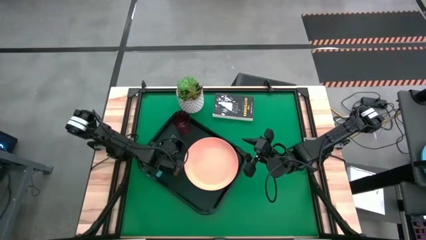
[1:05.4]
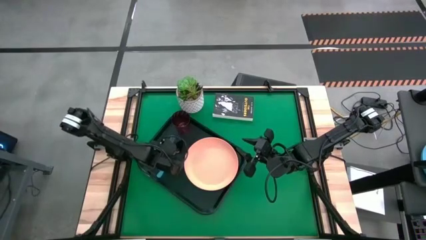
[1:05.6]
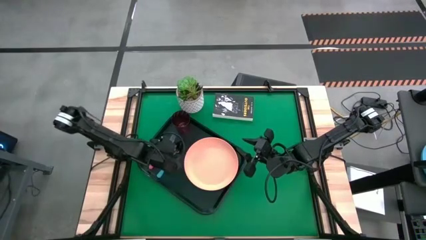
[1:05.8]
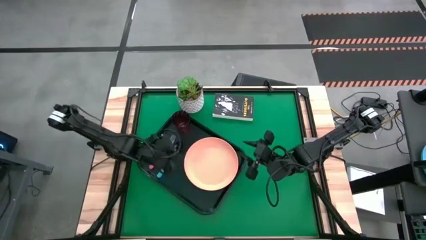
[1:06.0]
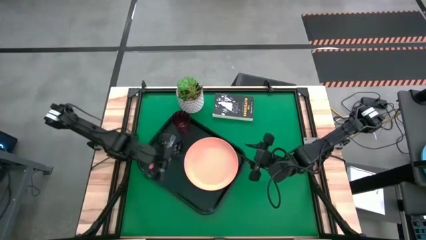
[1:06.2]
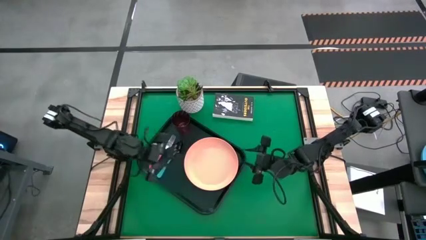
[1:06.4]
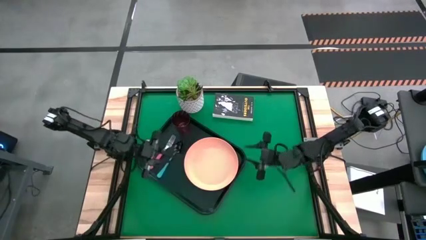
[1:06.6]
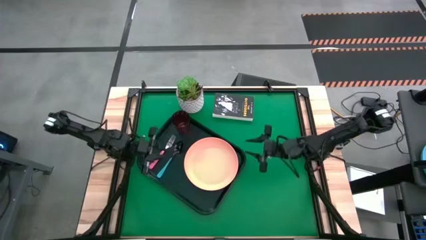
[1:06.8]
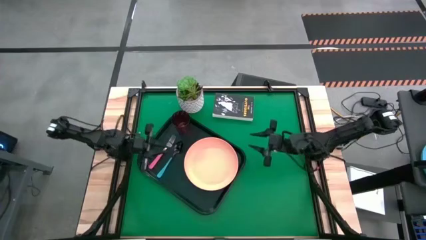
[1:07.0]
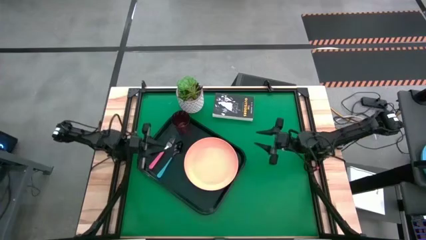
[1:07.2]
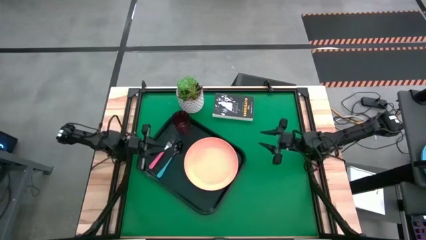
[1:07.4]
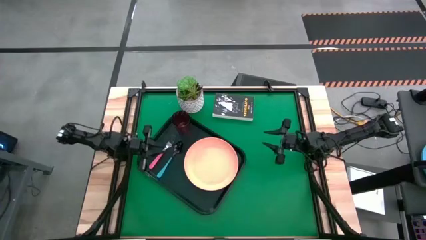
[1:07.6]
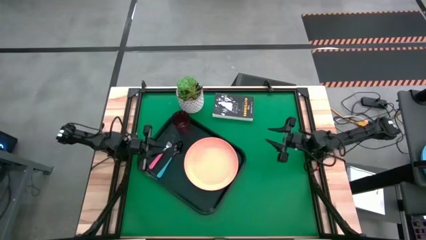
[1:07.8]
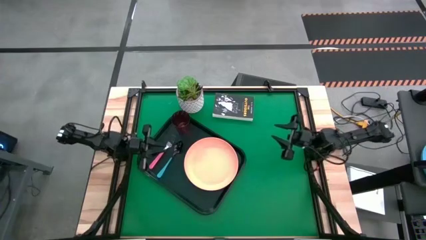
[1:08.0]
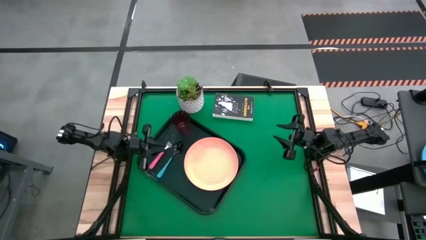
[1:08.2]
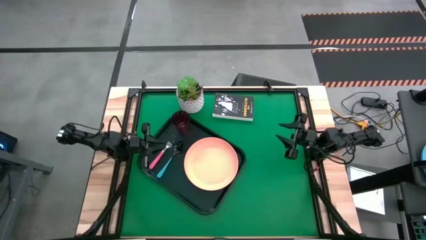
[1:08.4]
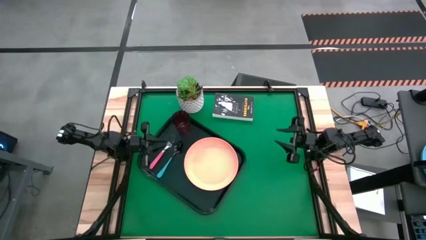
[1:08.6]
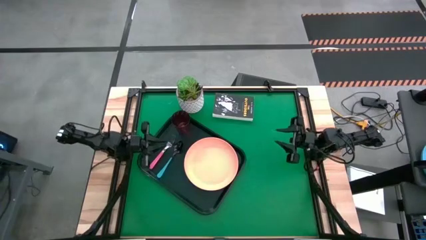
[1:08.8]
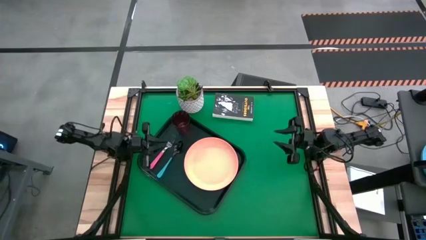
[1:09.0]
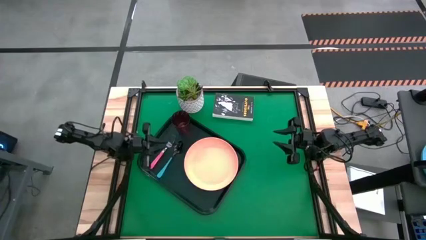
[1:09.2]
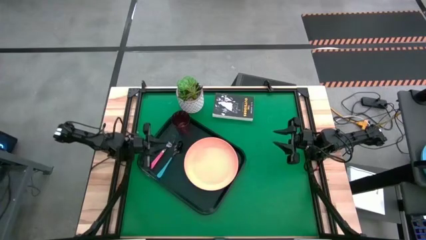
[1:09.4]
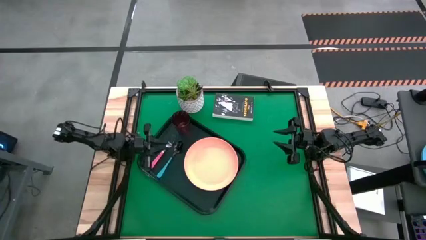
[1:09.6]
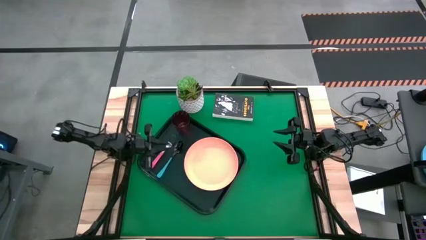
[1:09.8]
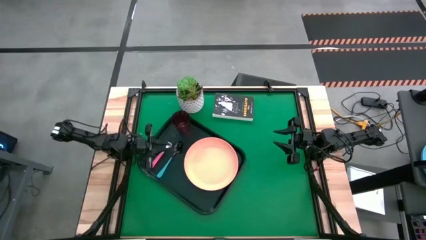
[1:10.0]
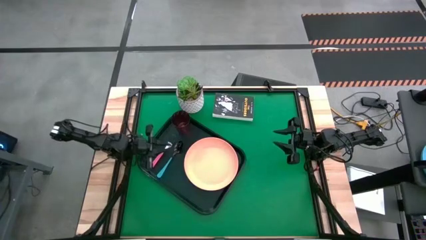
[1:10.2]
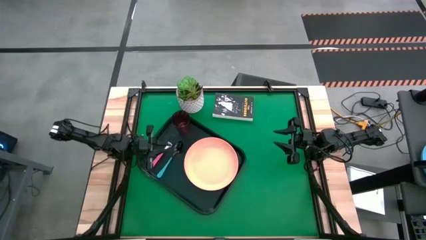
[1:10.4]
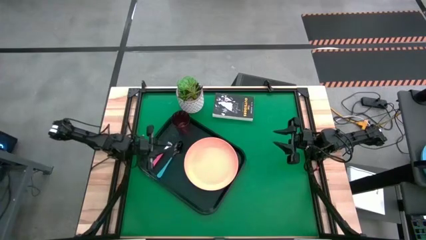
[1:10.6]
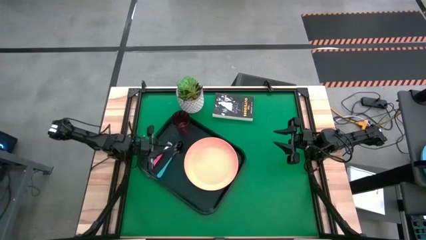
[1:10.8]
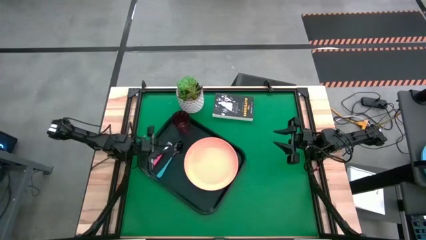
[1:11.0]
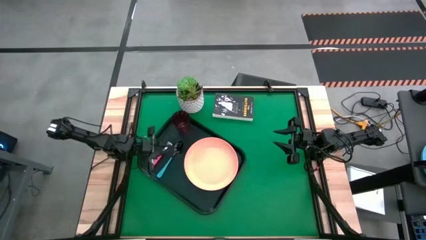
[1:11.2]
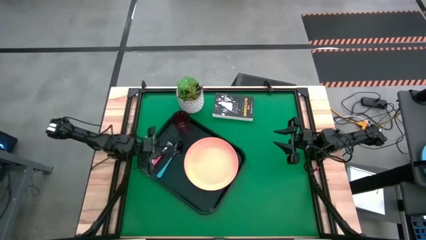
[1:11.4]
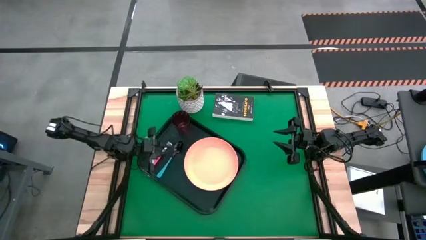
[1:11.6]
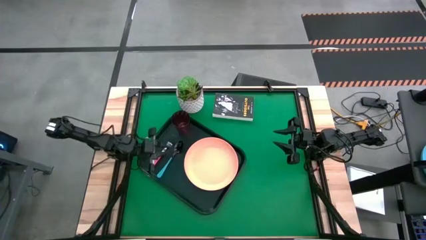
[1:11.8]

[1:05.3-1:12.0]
Task: Pick and place plate/cup/fork/spoon on tray
Return to Home Position

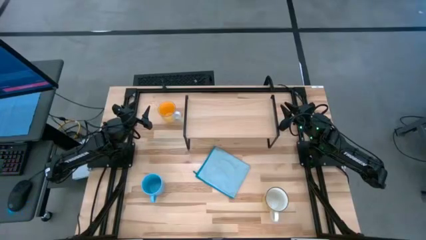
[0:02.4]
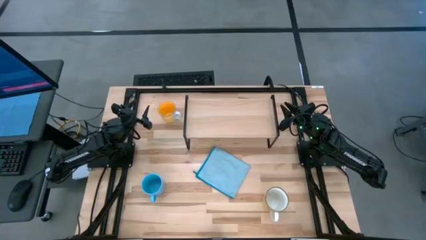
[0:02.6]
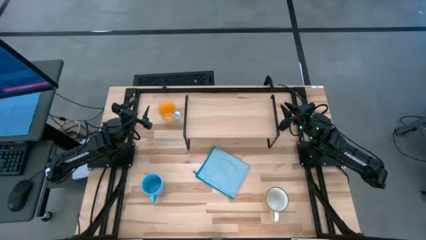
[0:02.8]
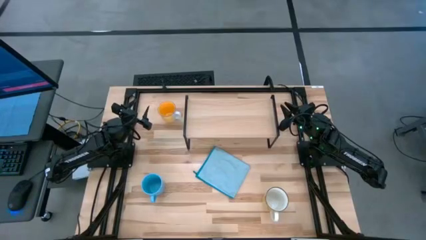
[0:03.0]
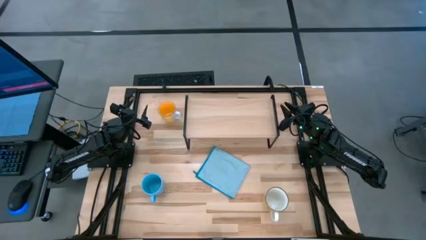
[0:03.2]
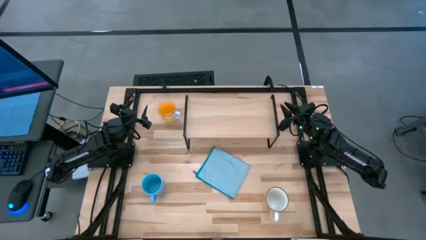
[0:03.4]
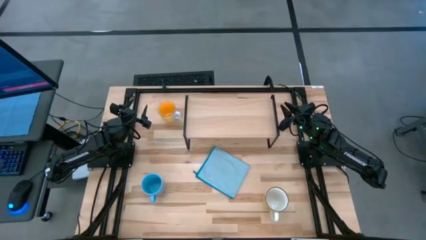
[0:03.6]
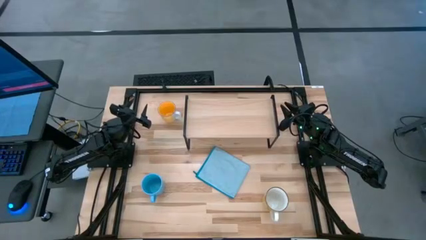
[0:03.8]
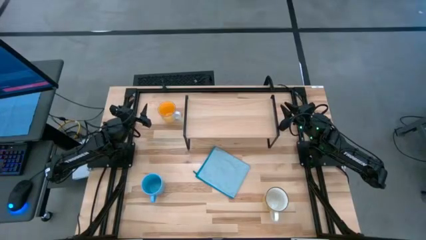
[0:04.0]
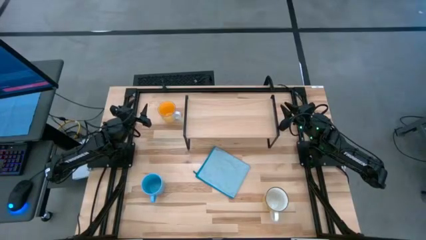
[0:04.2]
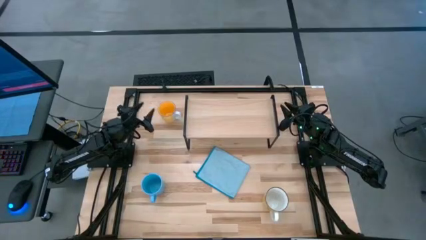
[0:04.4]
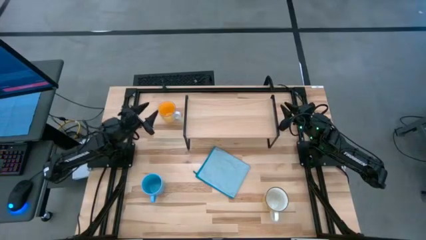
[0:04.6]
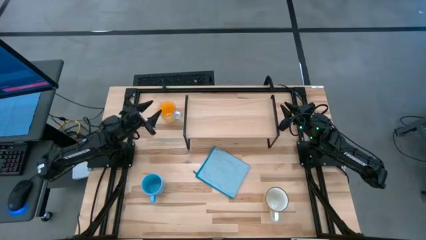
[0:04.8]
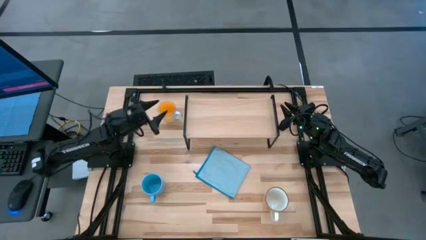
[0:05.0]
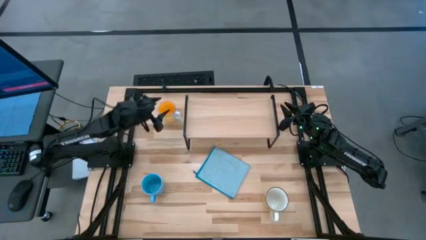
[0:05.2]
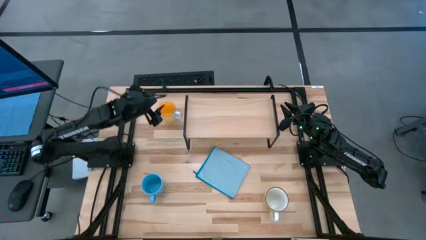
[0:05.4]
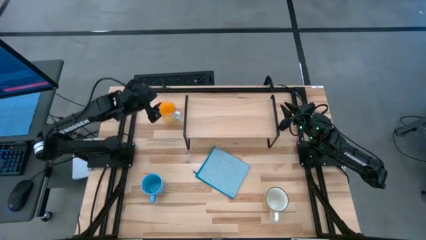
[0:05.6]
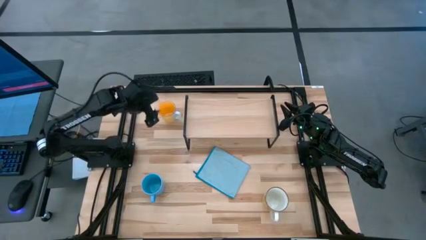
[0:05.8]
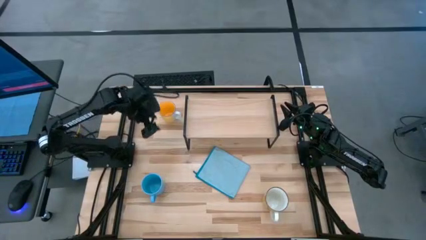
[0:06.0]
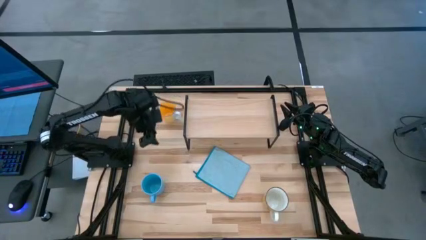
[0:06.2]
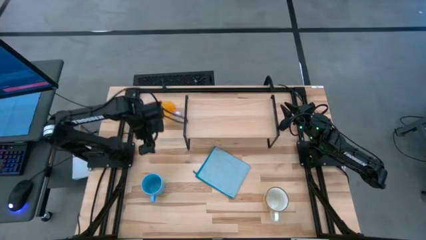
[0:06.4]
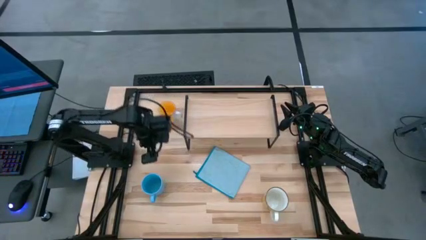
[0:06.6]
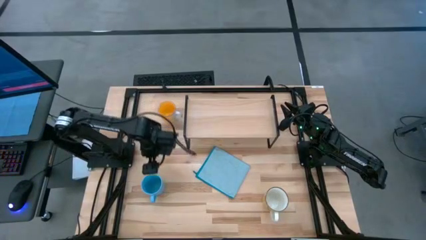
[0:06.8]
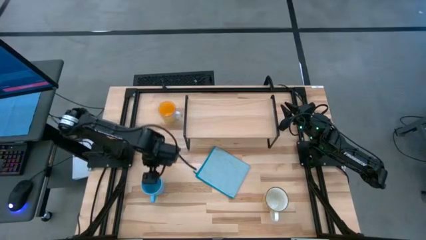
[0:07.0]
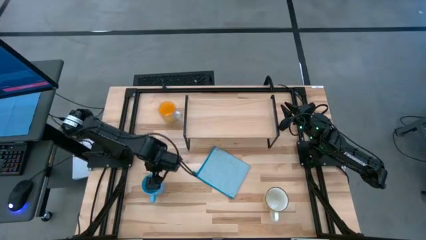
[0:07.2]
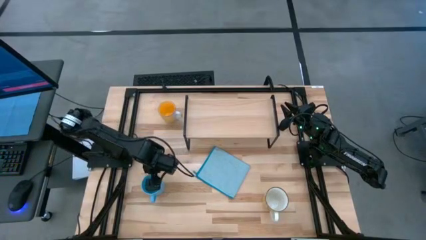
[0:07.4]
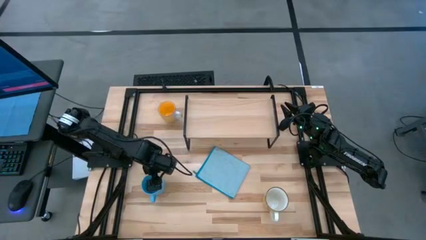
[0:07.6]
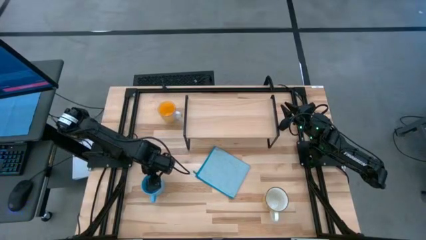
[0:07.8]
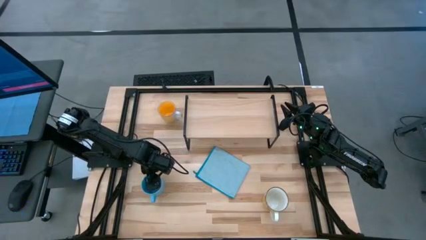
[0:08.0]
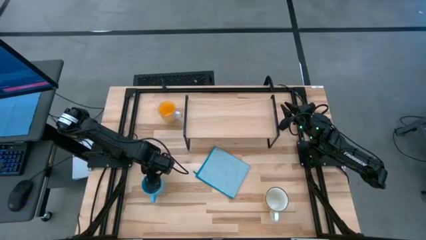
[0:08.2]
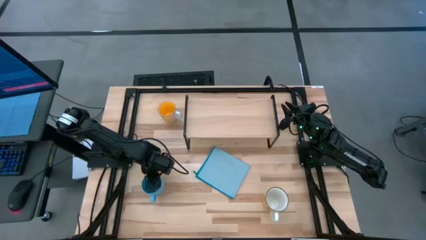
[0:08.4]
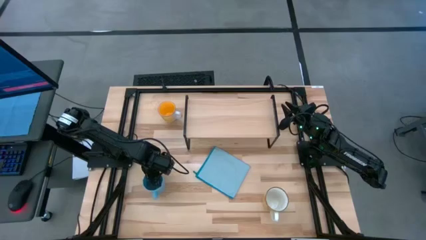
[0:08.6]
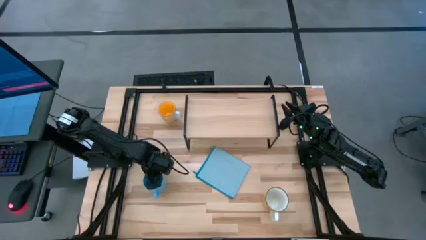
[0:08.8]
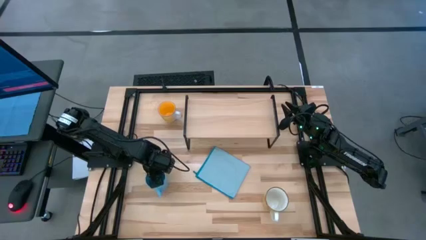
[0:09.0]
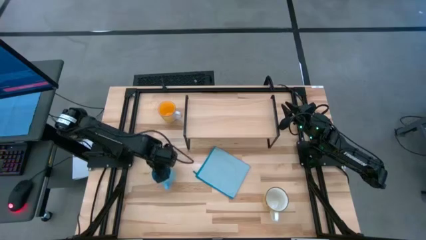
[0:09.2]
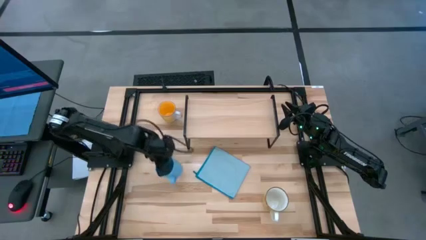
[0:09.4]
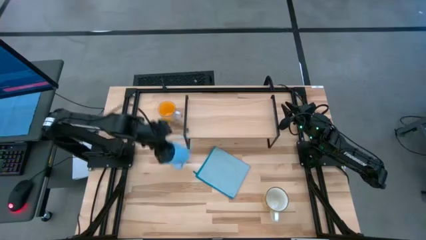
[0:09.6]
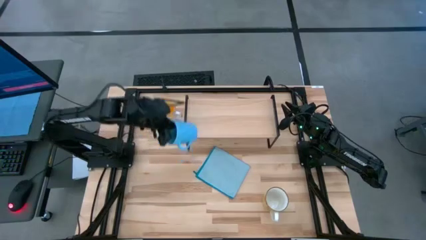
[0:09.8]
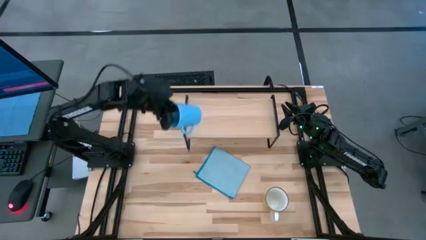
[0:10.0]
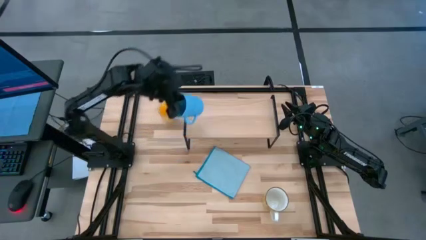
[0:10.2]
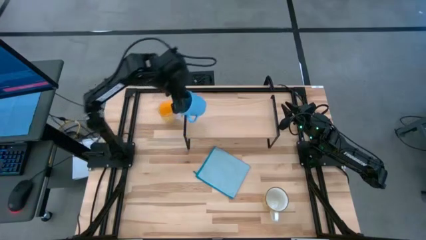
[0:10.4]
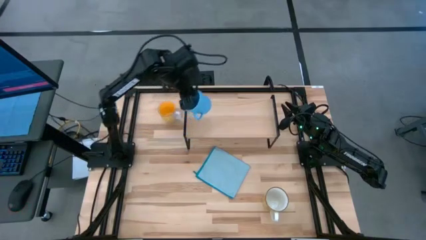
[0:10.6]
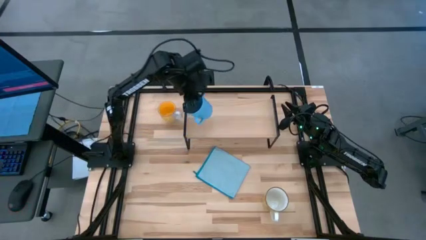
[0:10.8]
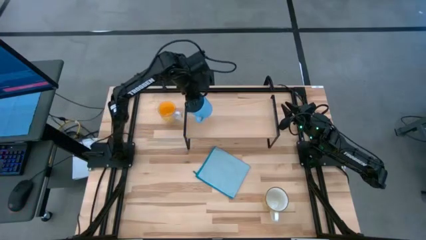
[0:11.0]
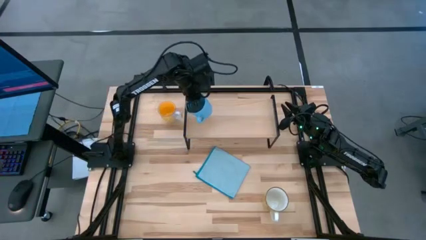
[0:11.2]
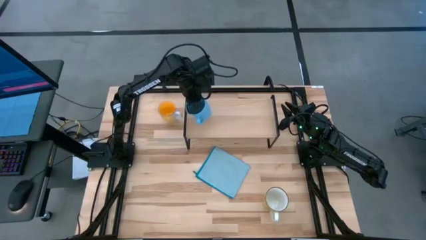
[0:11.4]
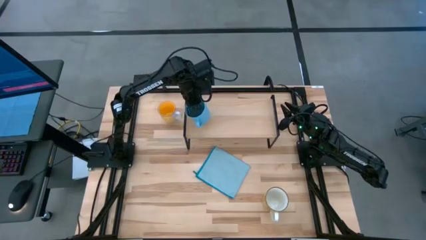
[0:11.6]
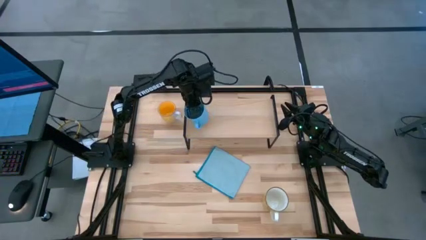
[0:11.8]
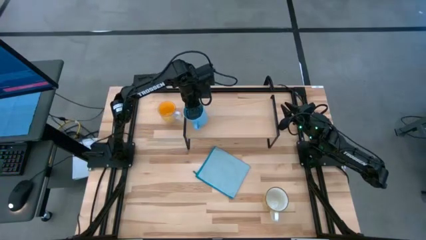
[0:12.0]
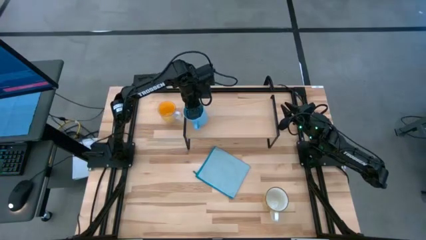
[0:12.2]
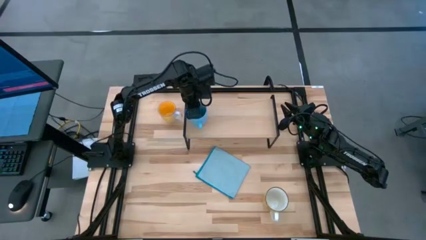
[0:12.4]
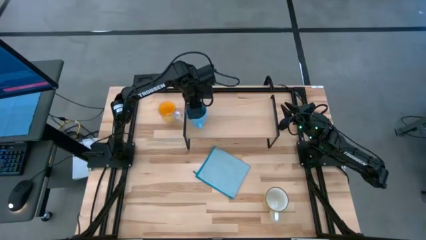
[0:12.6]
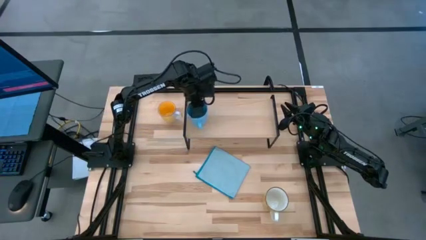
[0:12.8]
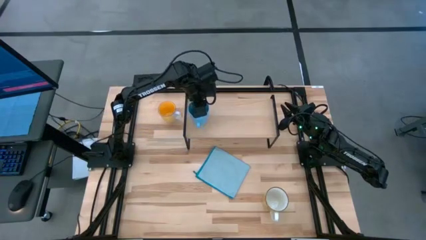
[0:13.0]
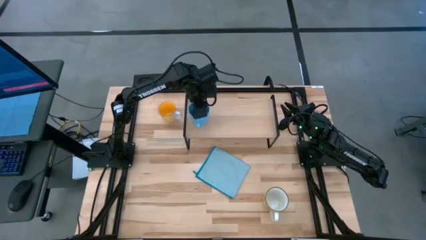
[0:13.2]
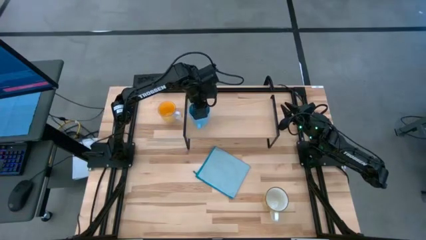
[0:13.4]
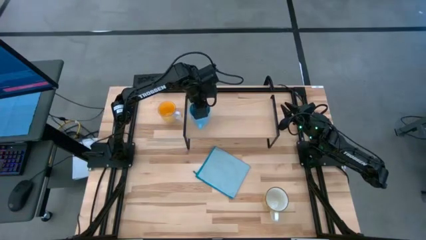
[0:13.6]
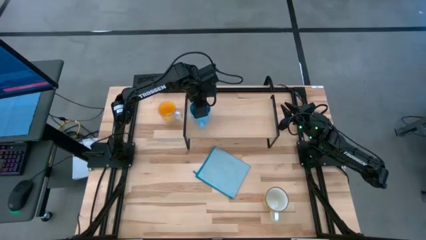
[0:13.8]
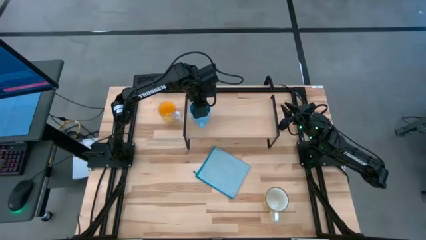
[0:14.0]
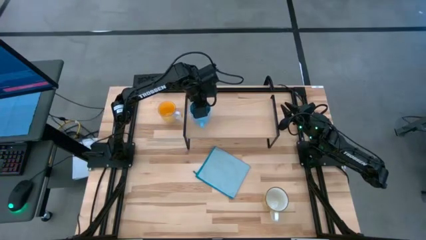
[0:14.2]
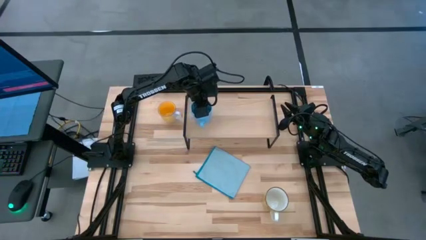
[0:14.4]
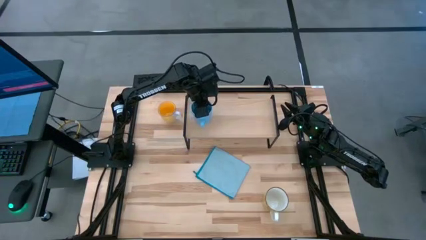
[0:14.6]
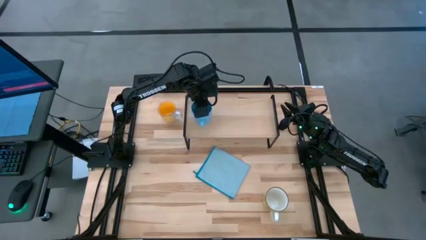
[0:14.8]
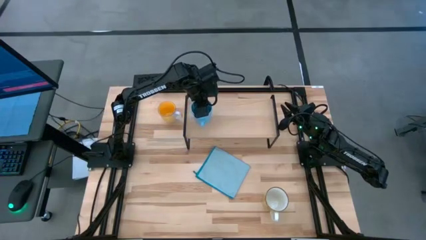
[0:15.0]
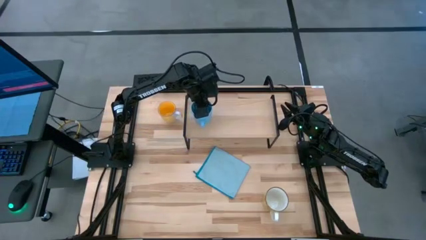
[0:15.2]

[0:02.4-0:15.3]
Task: Stack small to large cups/mugs on shelf
Put the blue mug on the shelf
